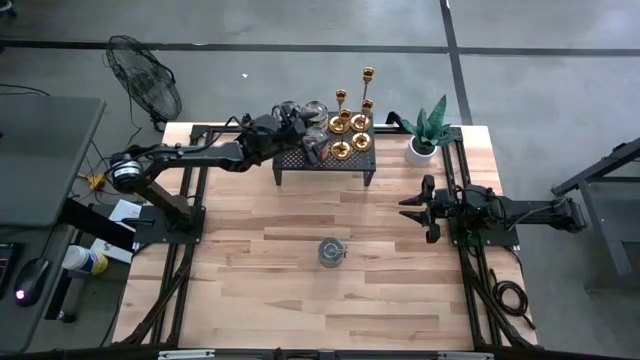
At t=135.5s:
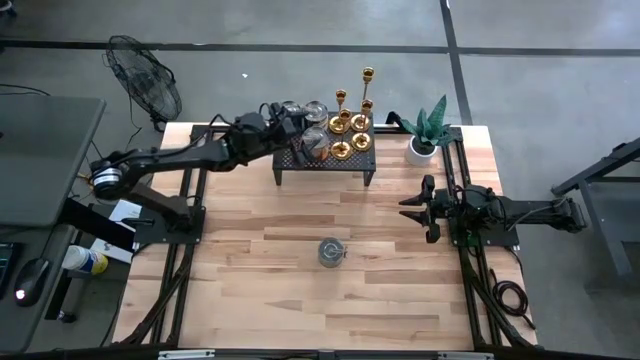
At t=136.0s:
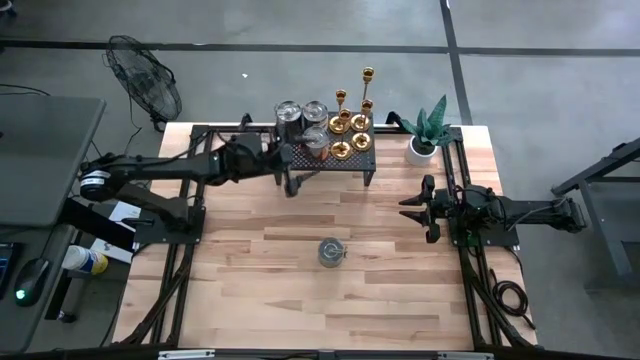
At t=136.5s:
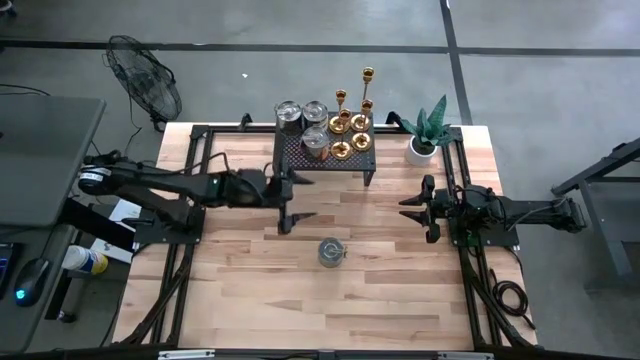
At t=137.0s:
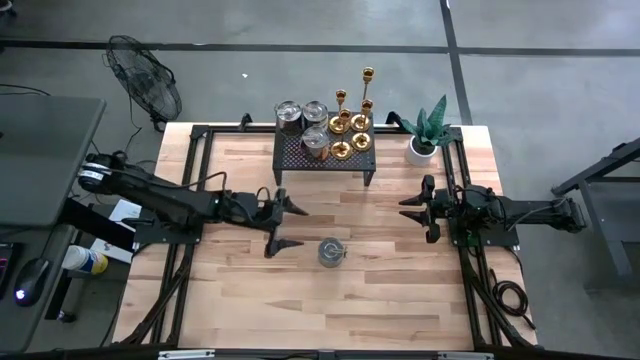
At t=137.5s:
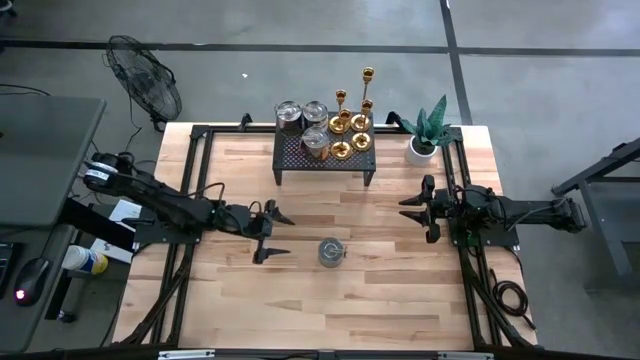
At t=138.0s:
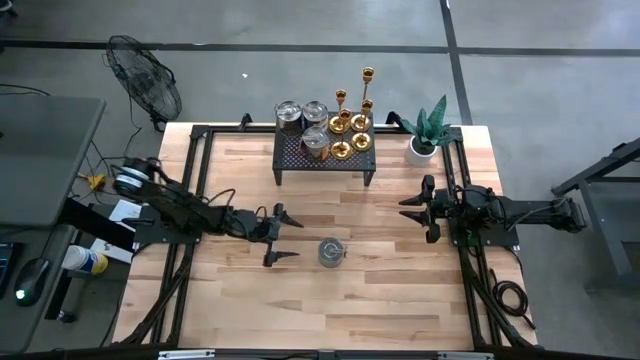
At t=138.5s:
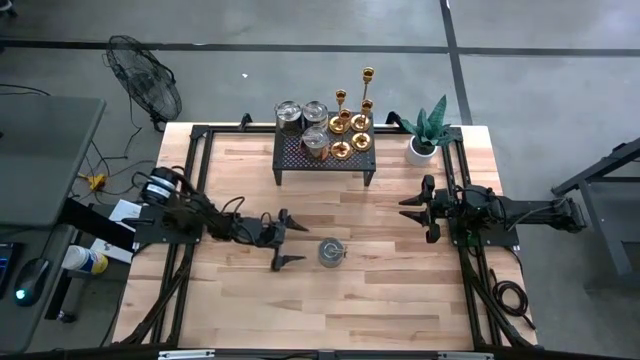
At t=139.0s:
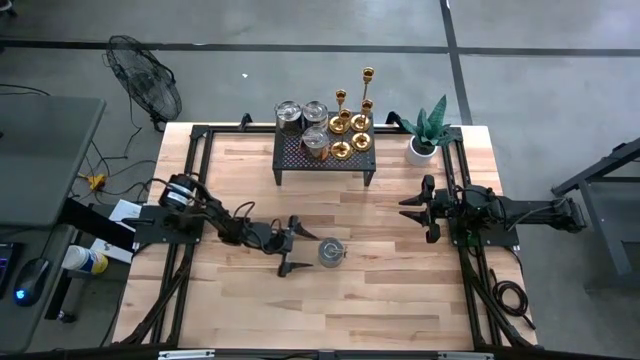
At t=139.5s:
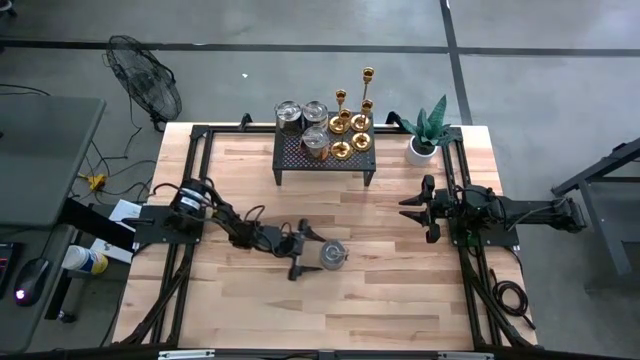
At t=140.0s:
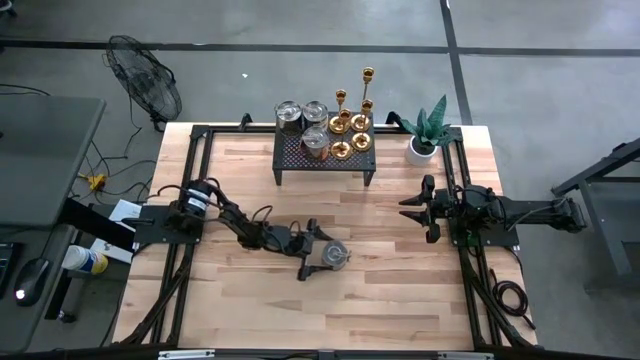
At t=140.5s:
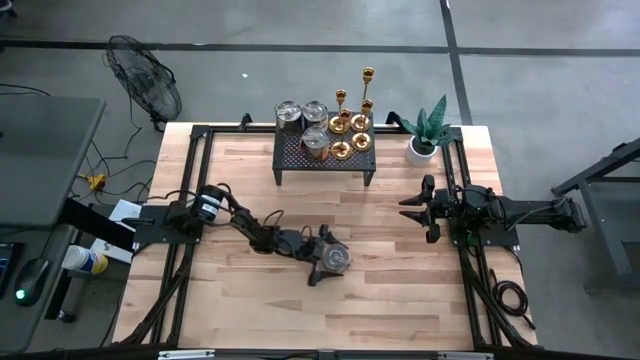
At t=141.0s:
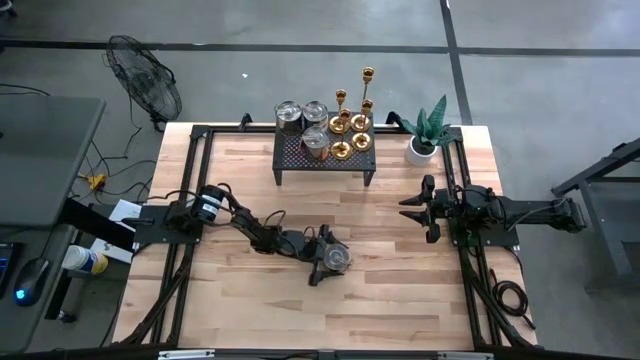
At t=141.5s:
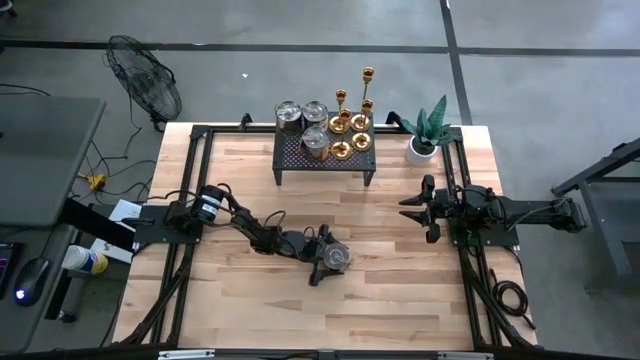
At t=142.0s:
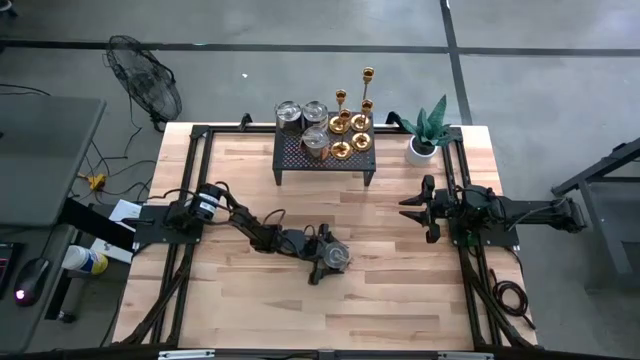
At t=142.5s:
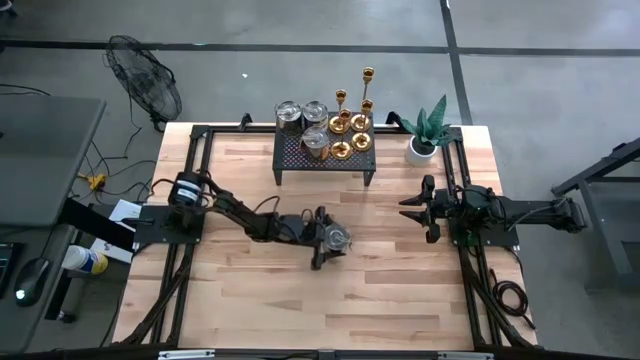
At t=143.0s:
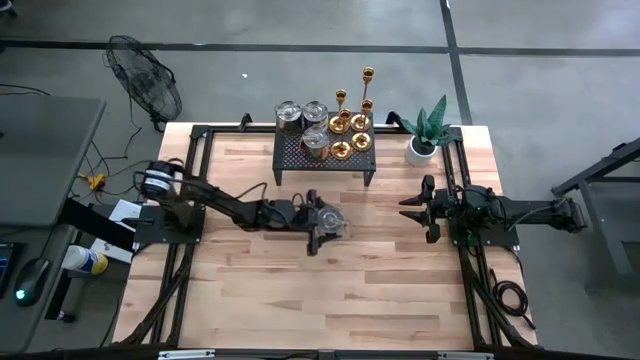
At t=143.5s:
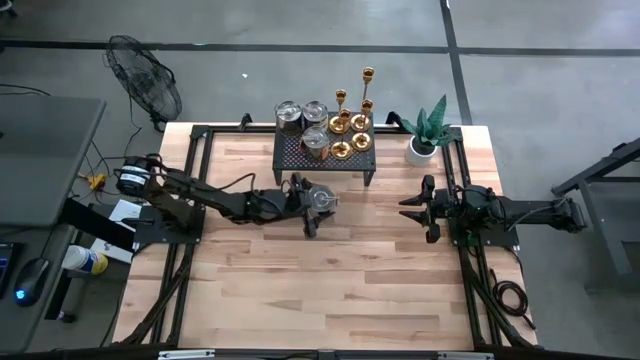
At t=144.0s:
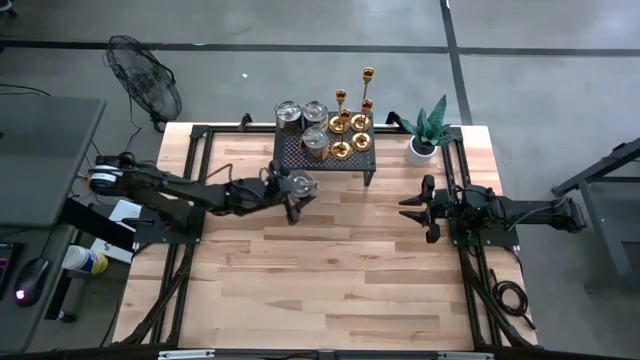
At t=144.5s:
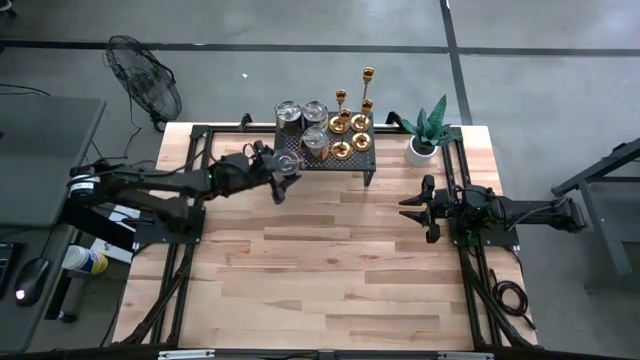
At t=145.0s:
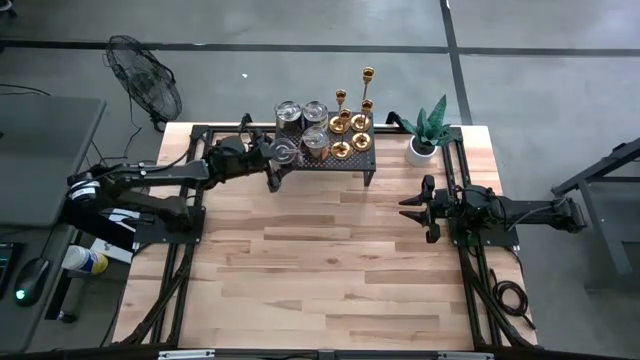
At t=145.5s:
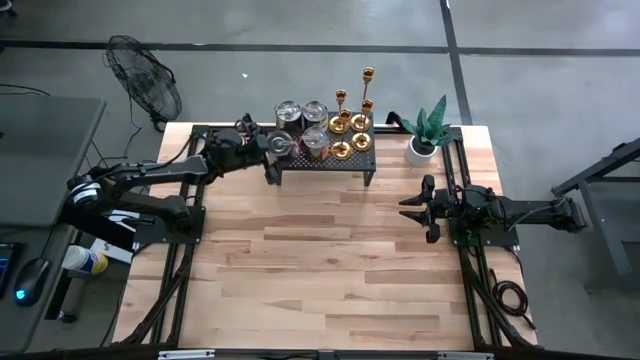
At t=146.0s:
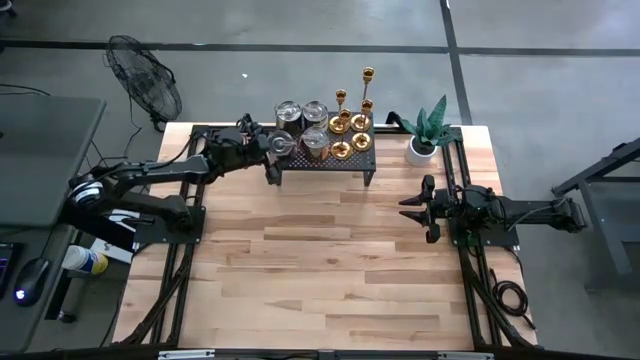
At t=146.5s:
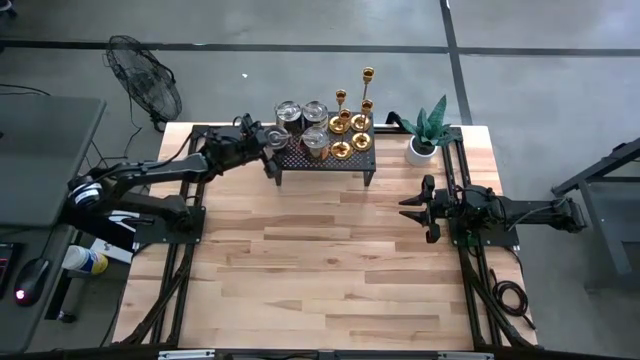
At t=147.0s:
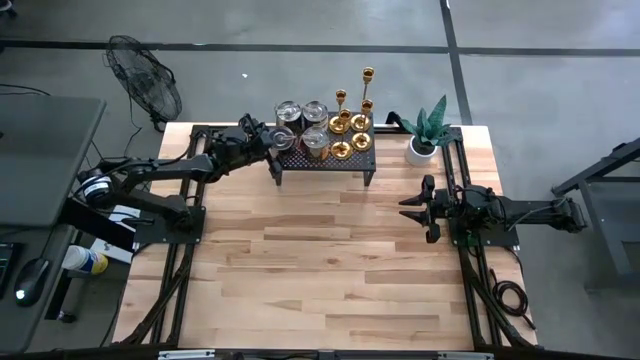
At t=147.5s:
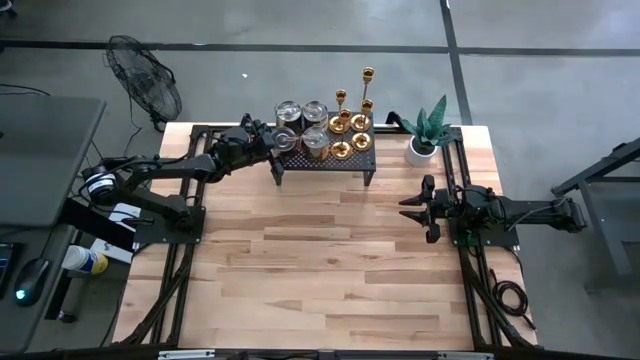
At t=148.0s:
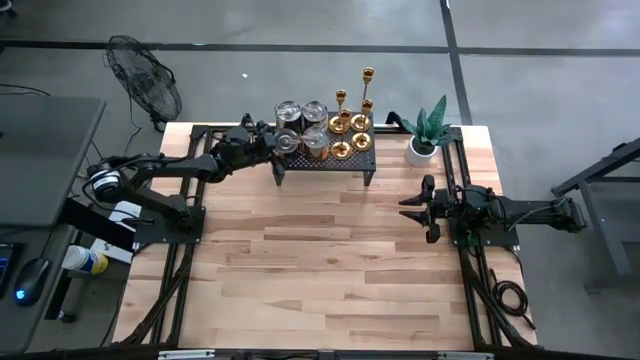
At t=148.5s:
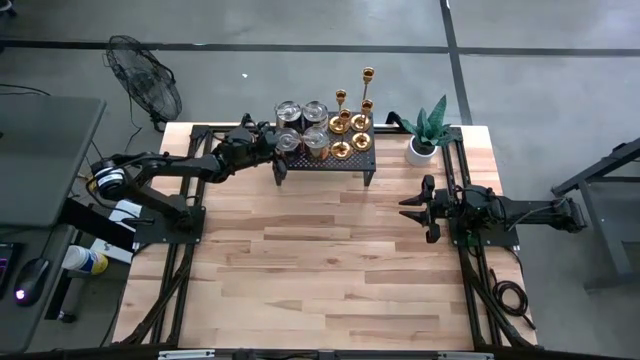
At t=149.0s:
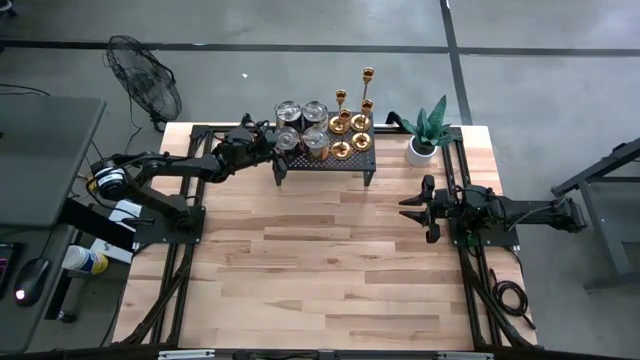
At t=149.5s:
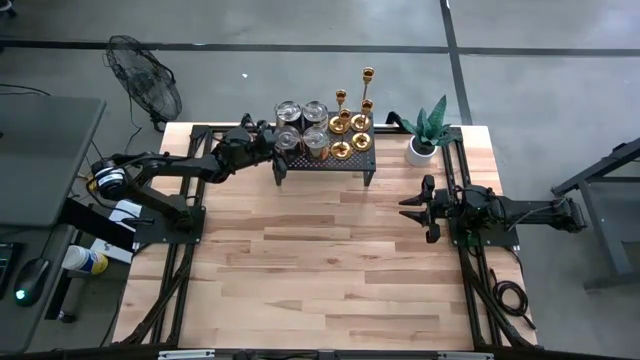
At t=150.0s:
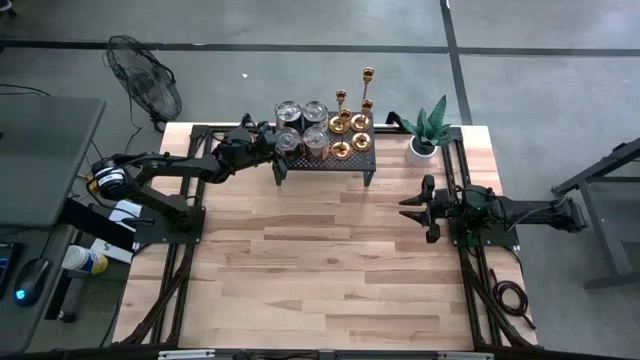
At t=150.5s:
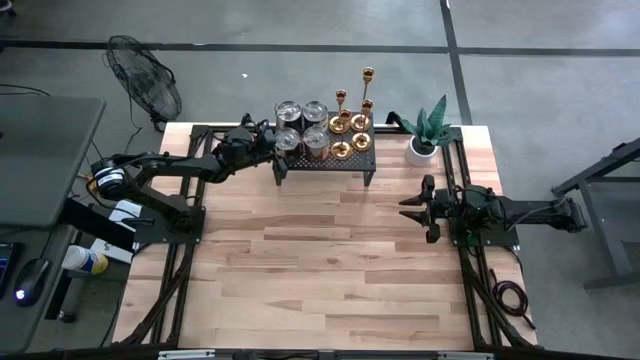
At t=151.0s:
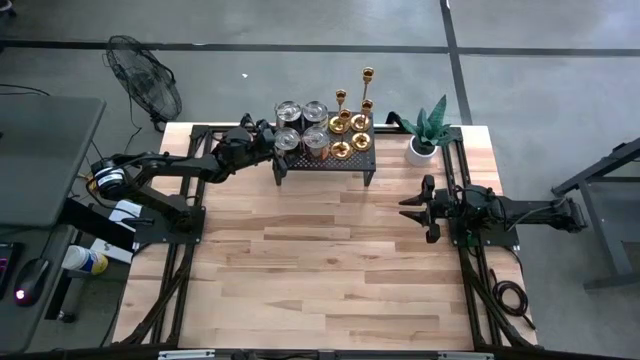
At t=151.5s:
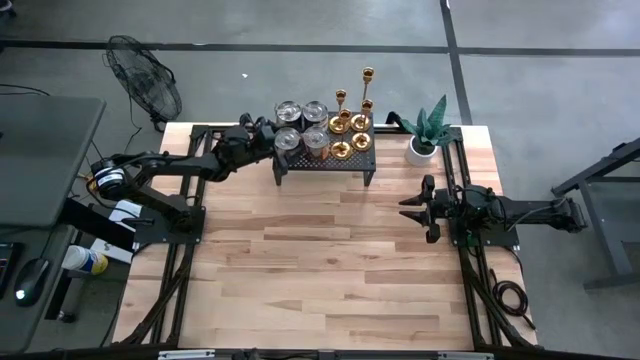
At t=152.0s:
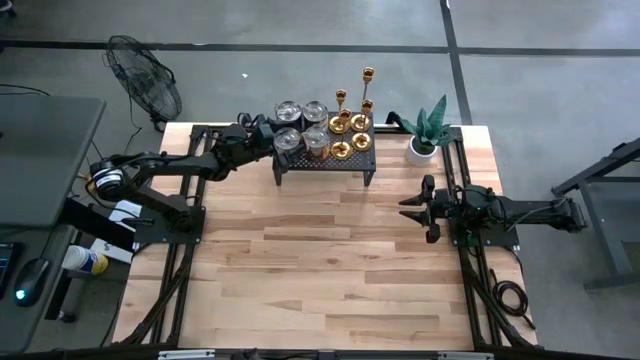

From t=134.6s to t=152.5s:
Task: Pick & Place candle stick holders
Put the scented candle on the shelf

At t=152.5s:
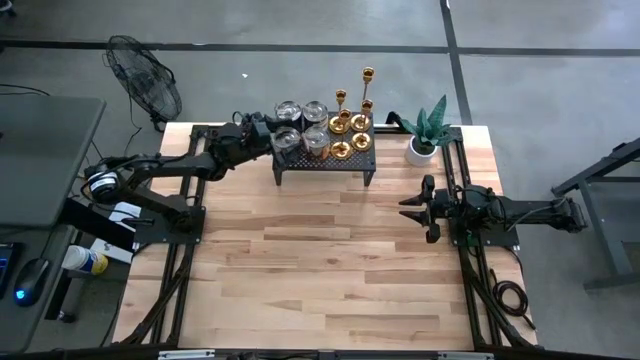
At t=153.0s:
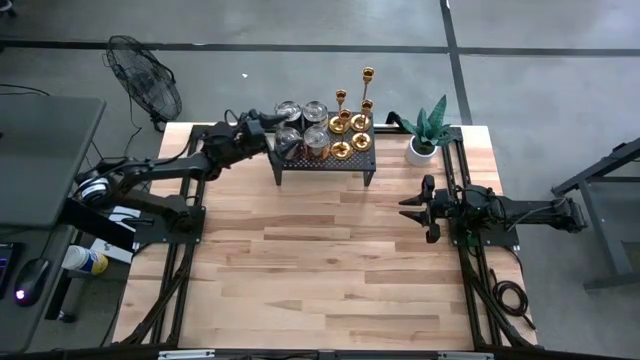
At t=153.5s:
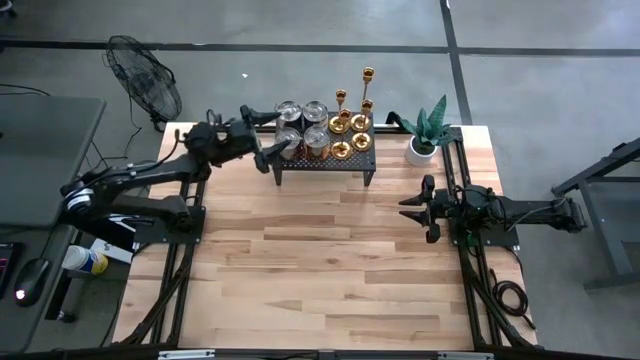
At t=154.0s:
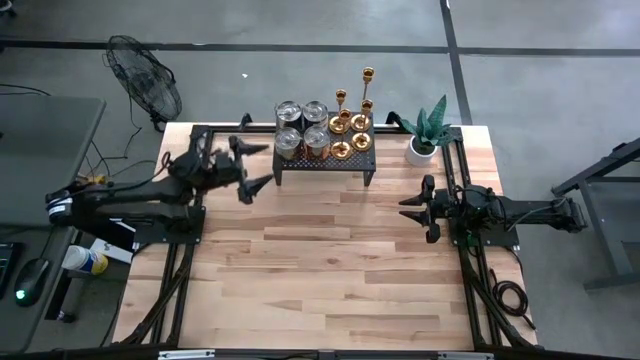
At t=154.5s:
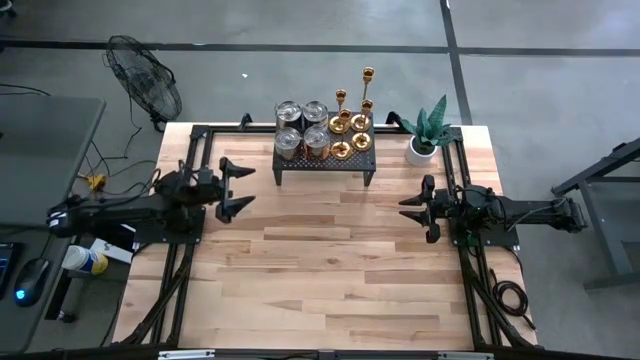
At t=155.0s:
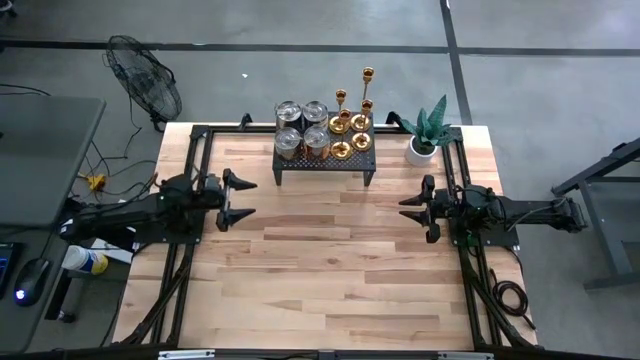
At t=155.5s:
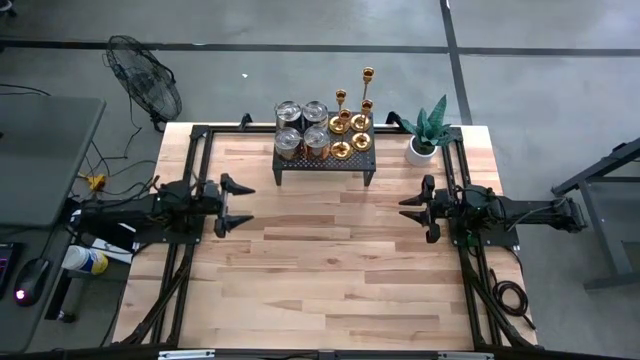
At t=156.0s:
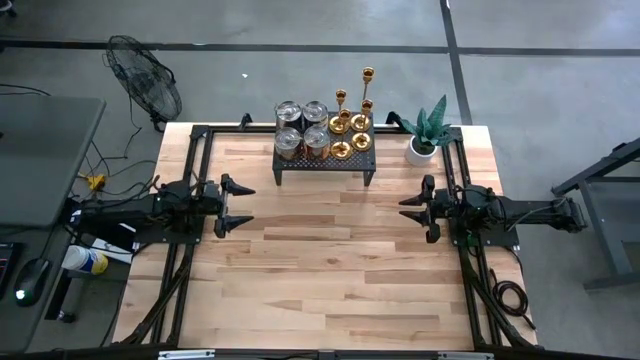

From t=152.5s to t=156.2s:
Return to Home Position
